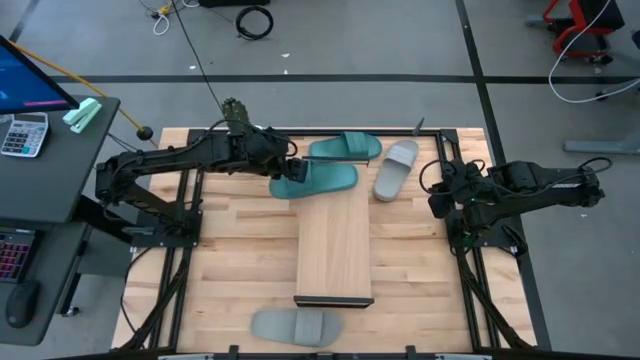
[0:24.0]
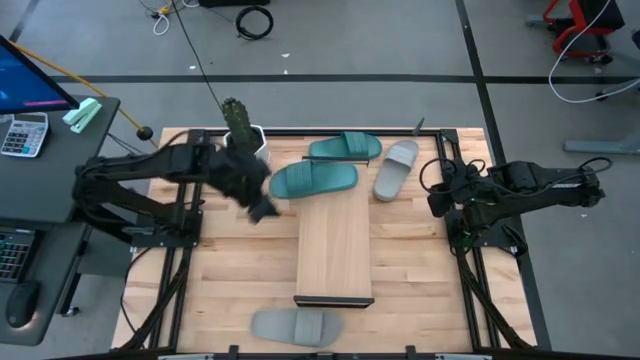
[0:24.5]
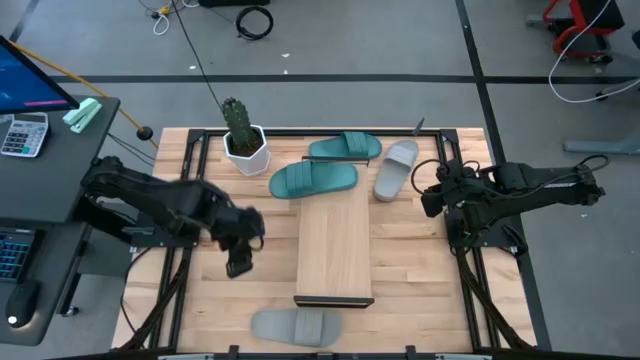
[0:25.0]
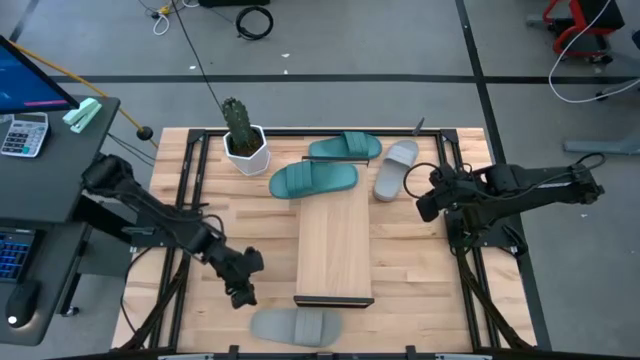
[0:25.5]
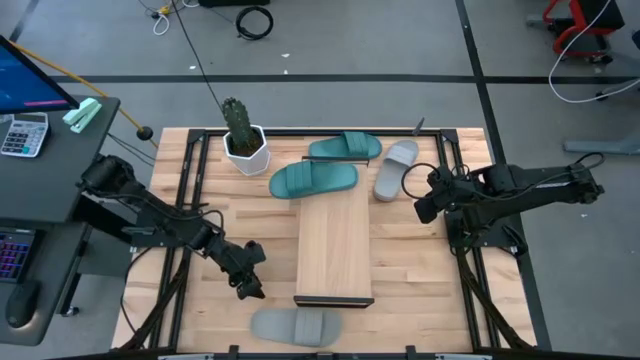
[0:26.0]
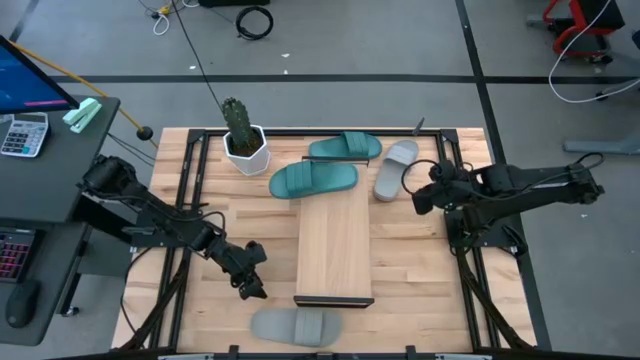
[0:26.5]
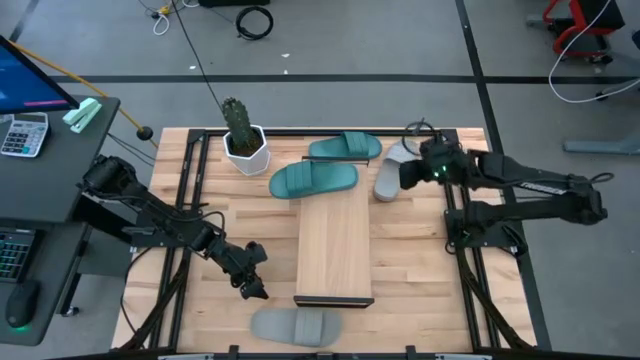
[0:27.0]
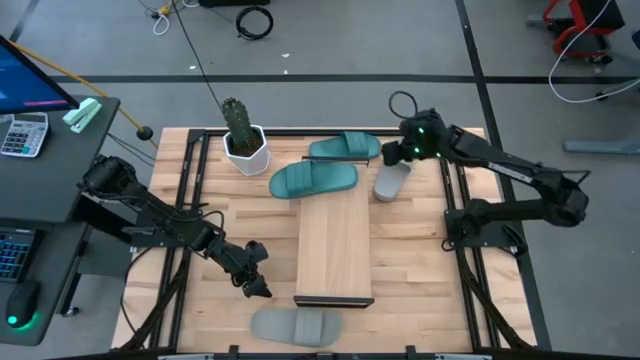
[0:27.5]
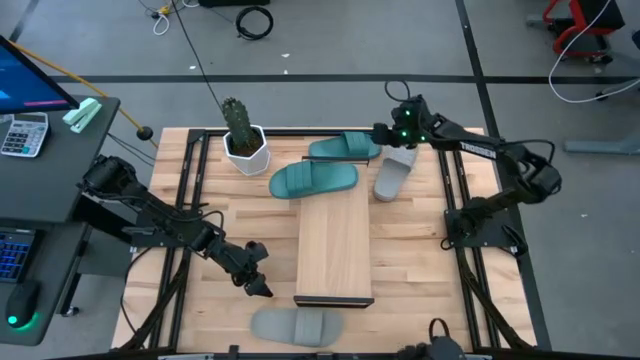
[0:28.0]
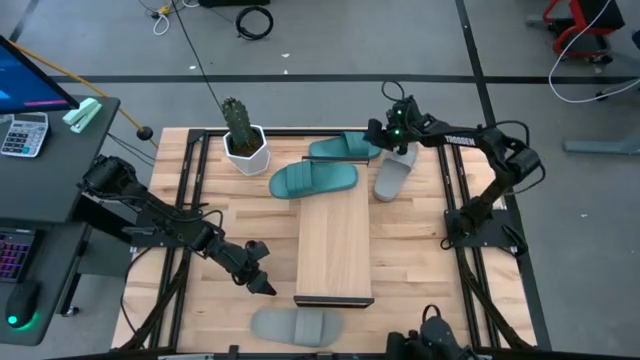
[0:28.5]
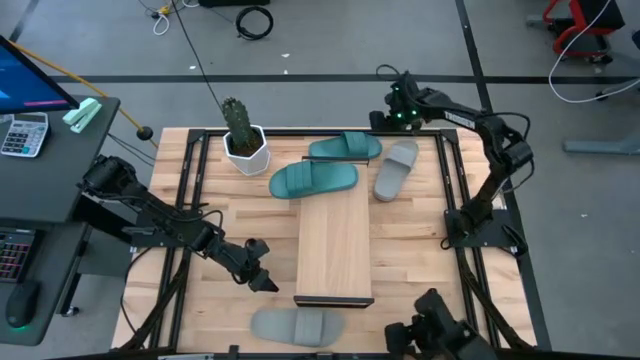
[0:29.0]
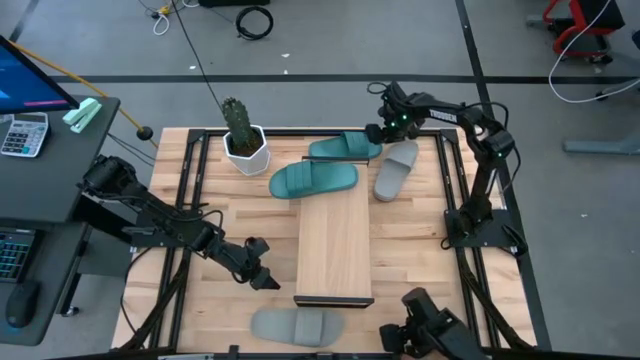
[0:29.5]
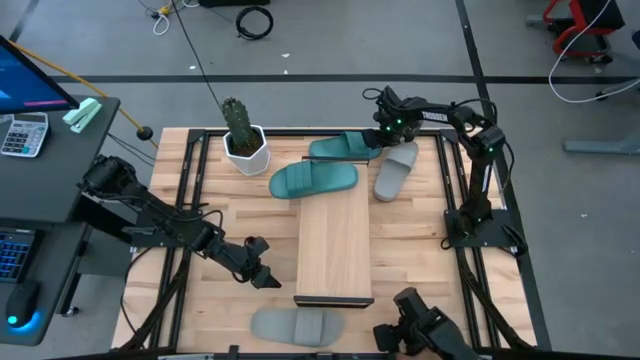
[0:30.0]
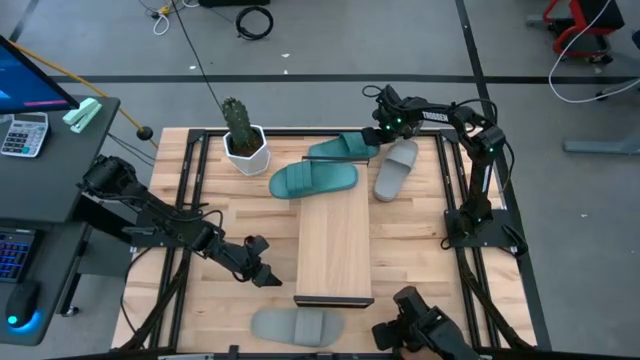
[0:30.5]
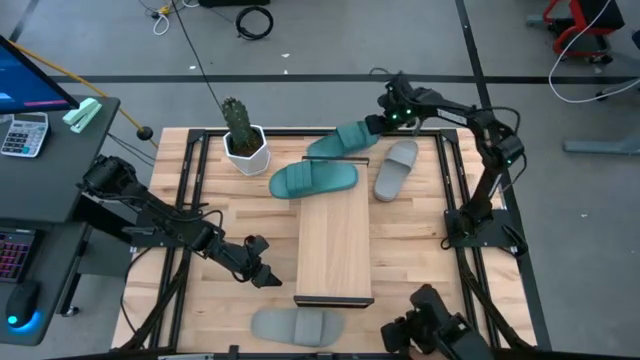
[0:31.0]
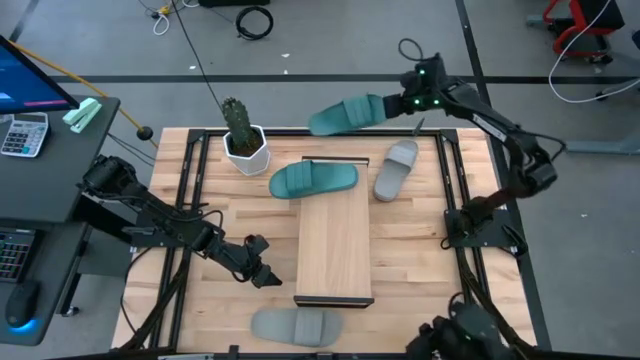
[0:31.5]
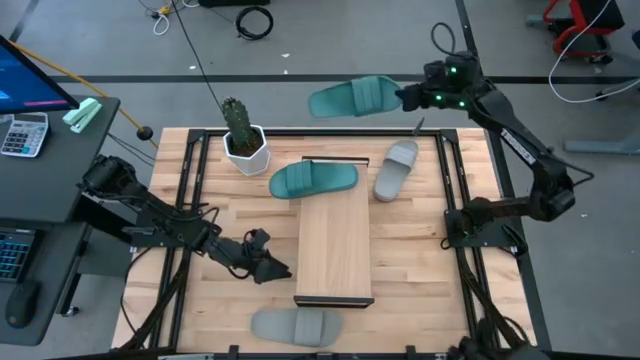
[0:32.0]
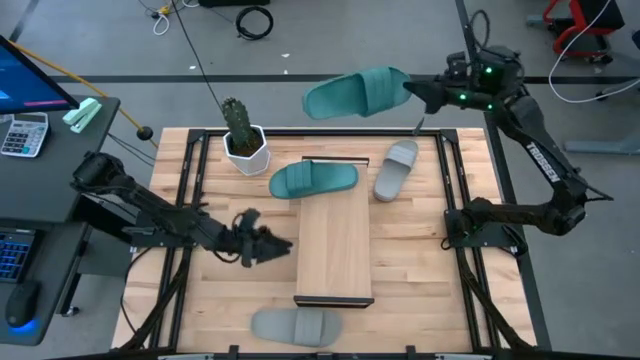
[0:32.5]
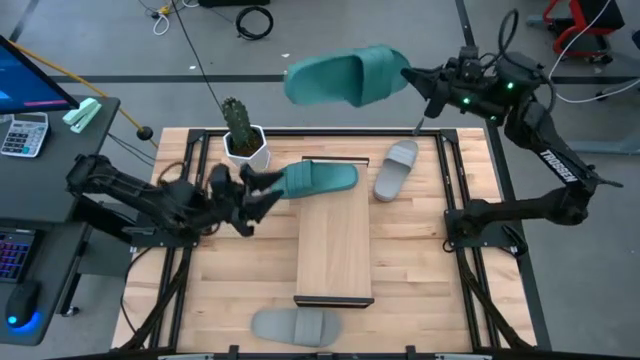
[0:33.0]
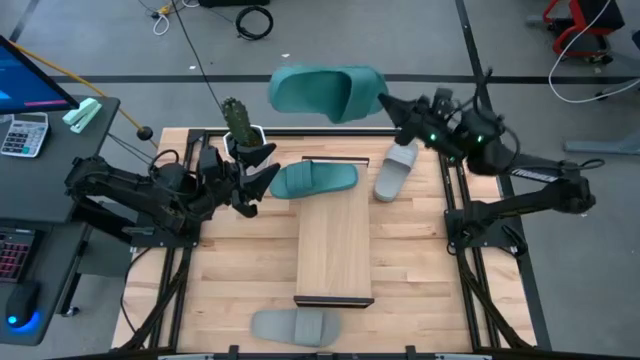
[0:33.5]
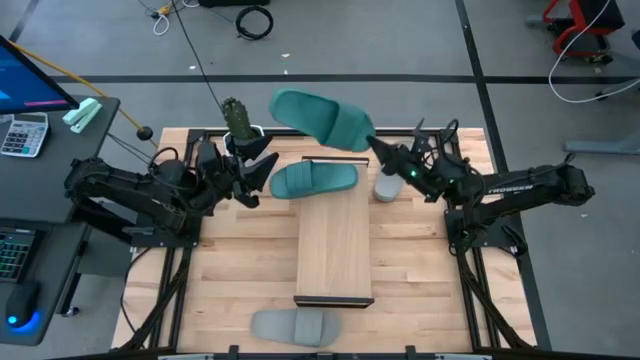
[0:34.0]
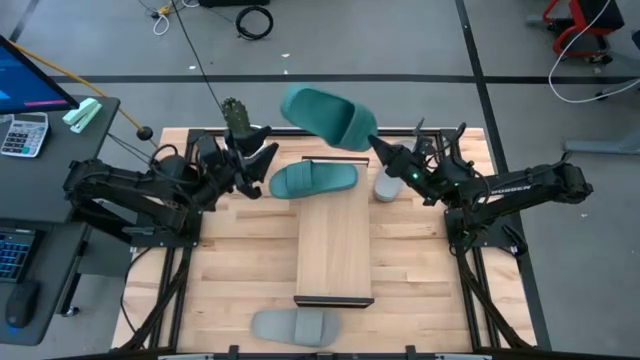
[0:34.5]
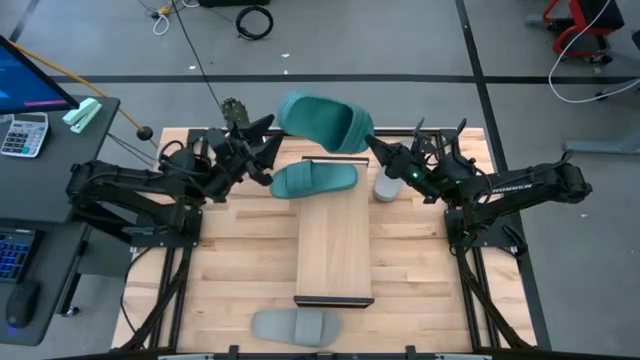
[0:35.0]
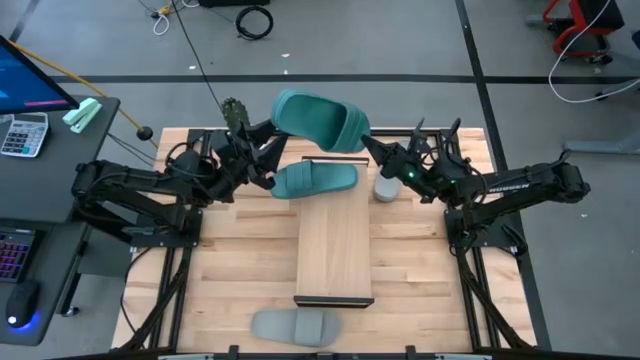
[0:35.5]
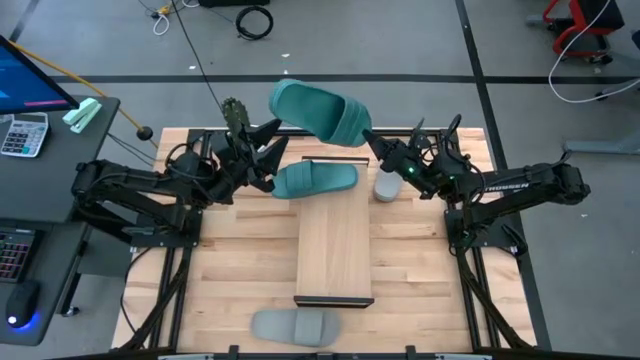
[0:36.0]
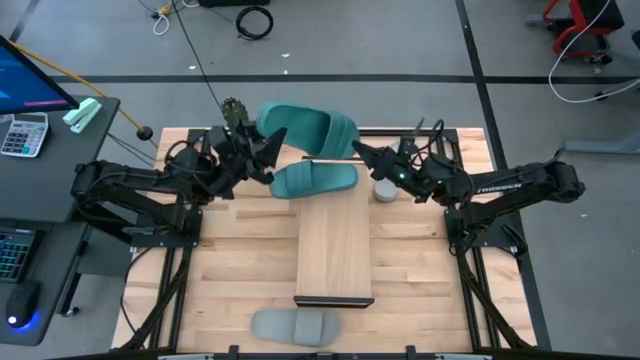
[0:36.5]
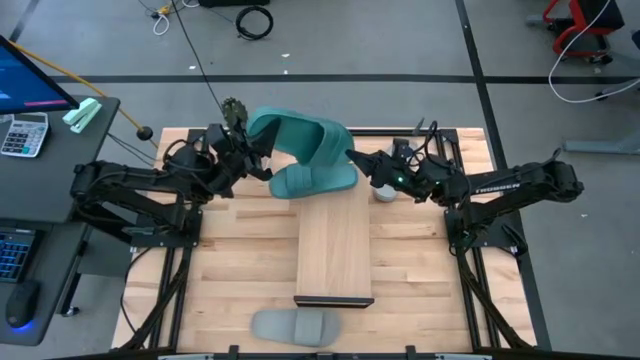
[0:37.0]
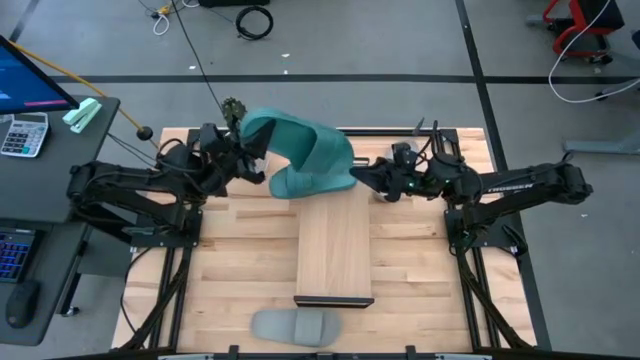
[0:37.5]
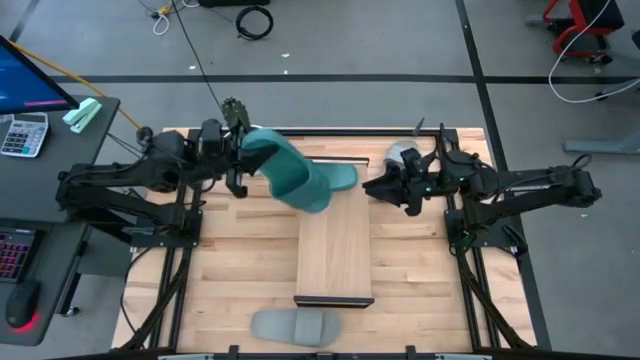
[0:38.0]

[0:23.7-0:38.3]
Task: Pick and place slides into the shelf
Put the green slide on the shelf
